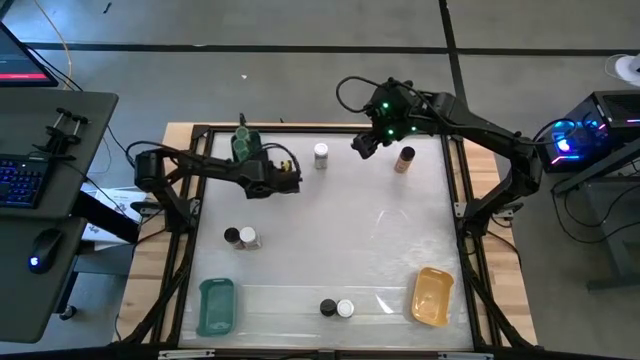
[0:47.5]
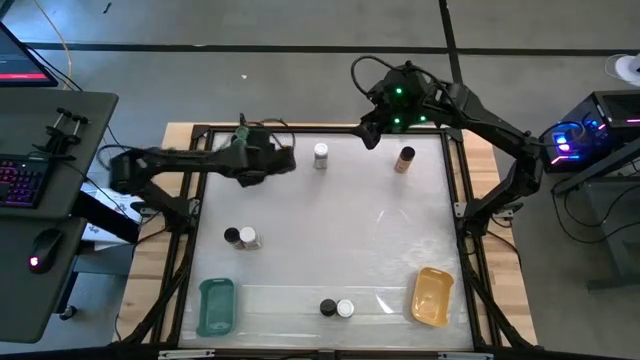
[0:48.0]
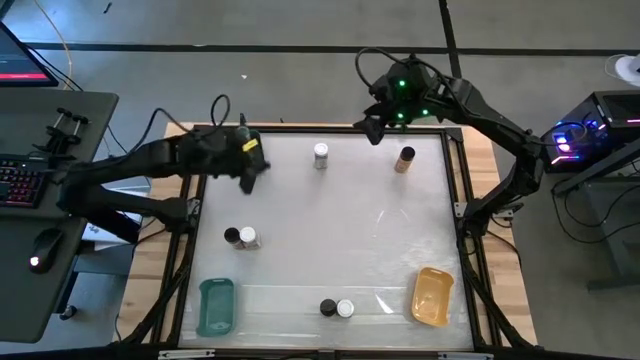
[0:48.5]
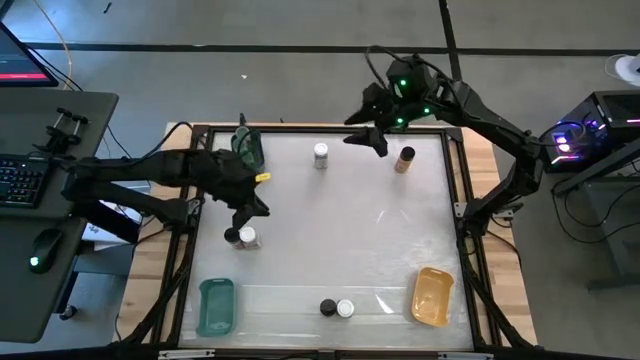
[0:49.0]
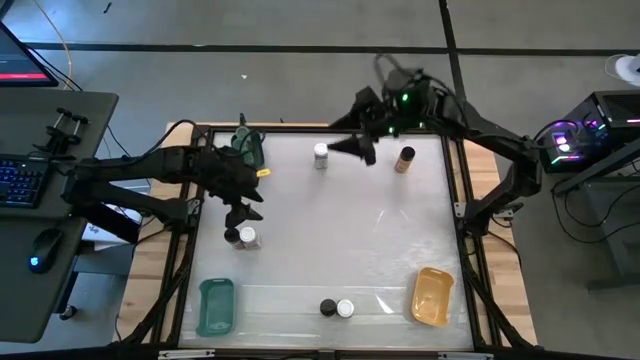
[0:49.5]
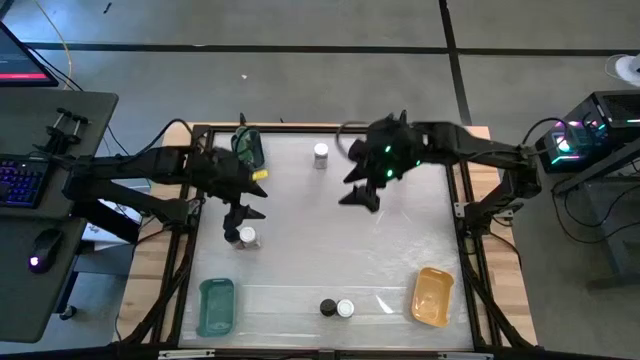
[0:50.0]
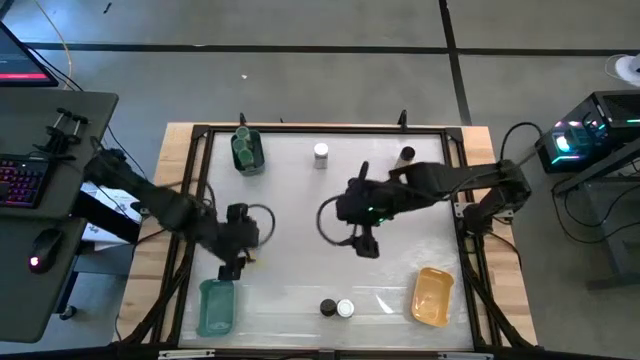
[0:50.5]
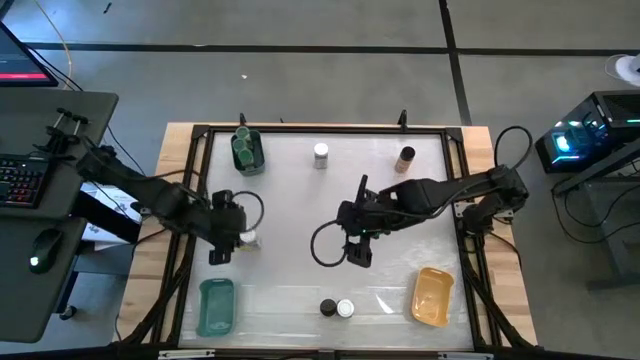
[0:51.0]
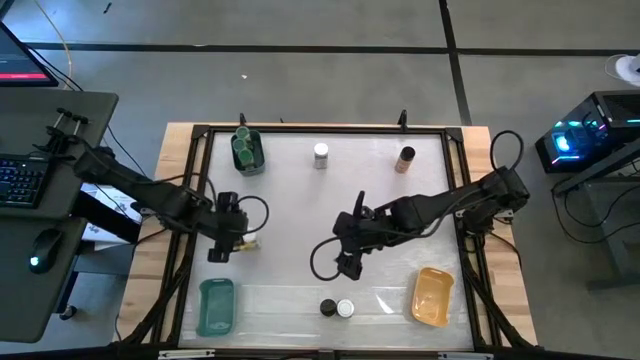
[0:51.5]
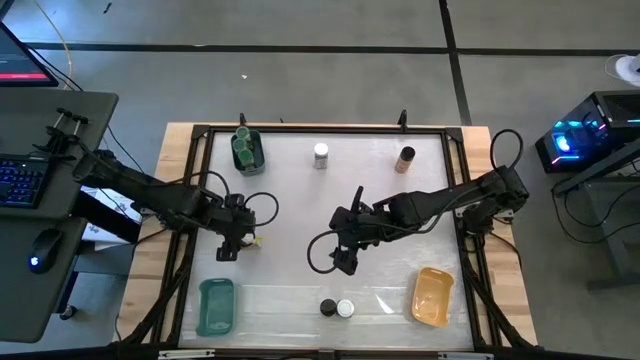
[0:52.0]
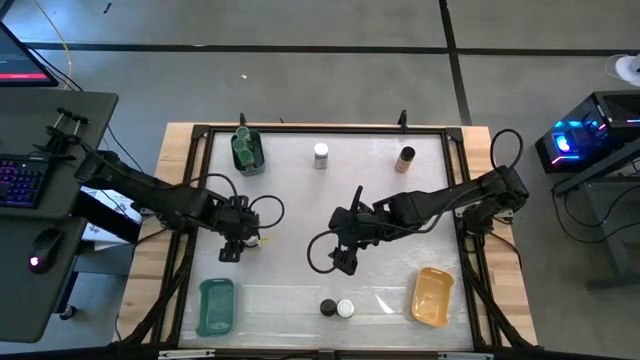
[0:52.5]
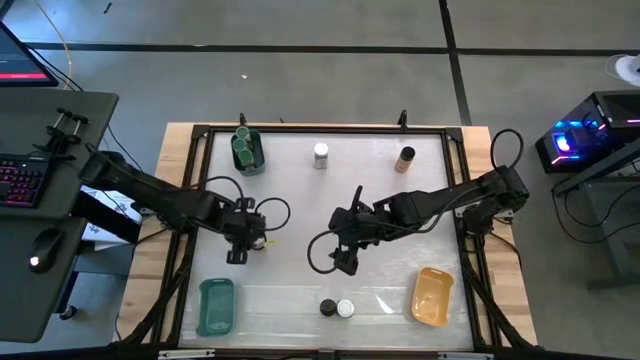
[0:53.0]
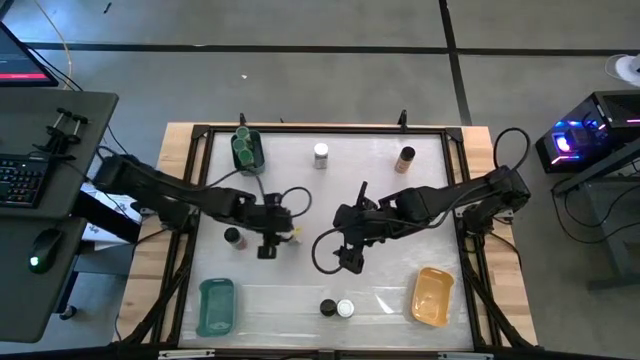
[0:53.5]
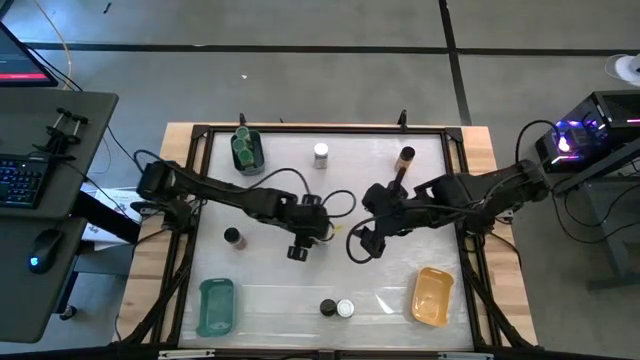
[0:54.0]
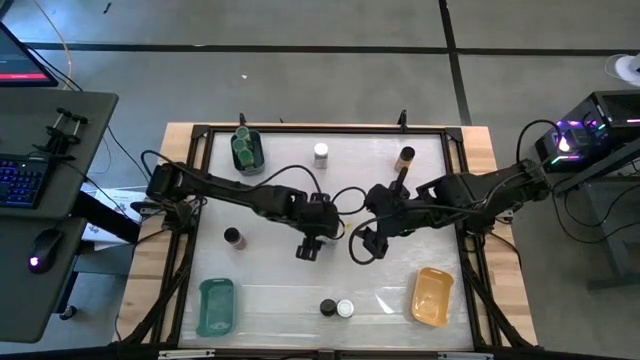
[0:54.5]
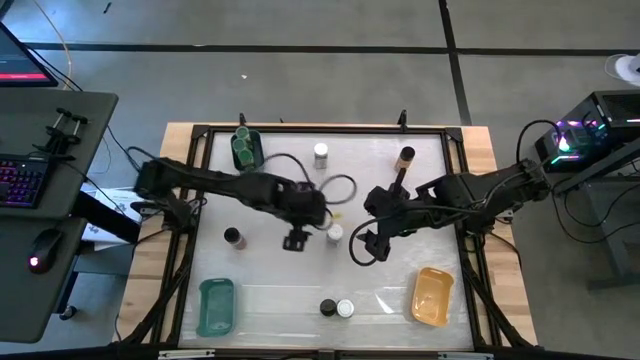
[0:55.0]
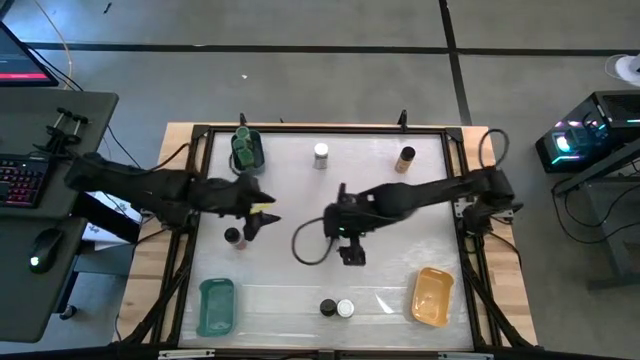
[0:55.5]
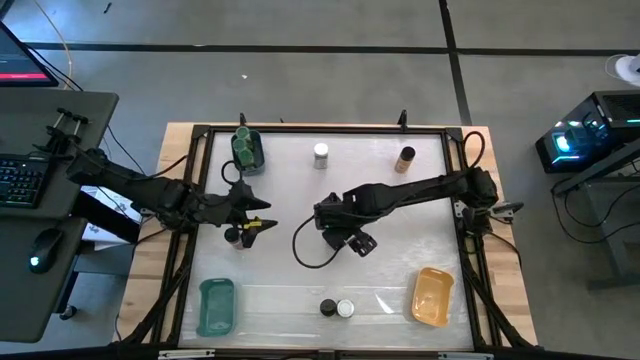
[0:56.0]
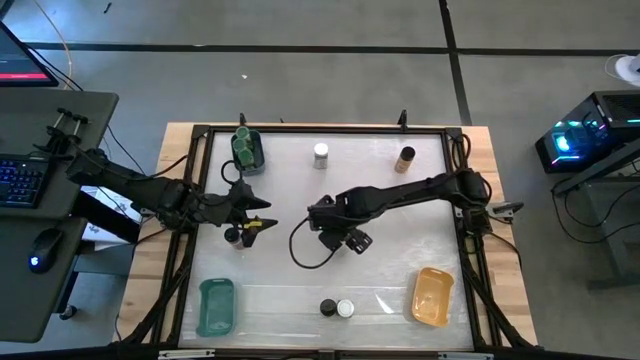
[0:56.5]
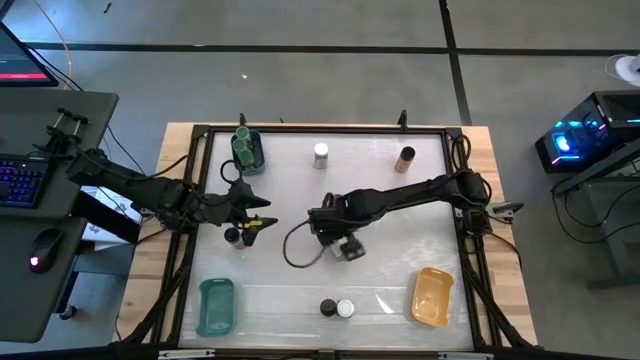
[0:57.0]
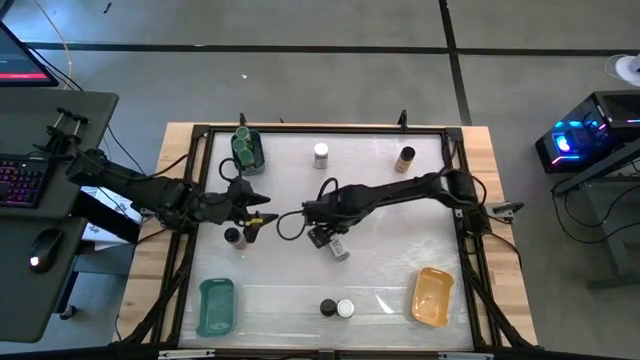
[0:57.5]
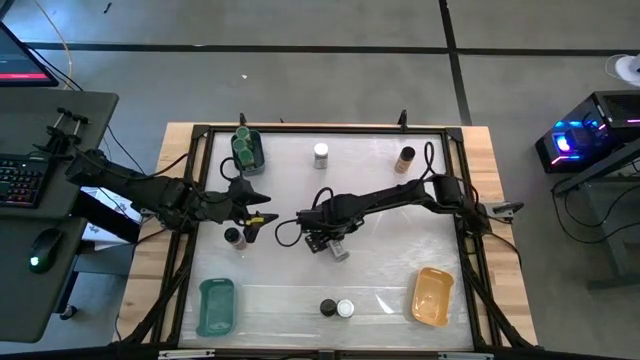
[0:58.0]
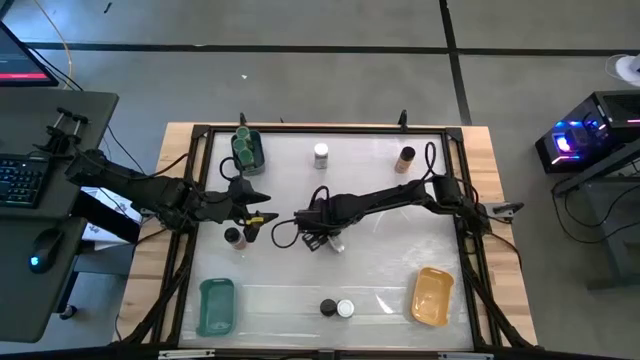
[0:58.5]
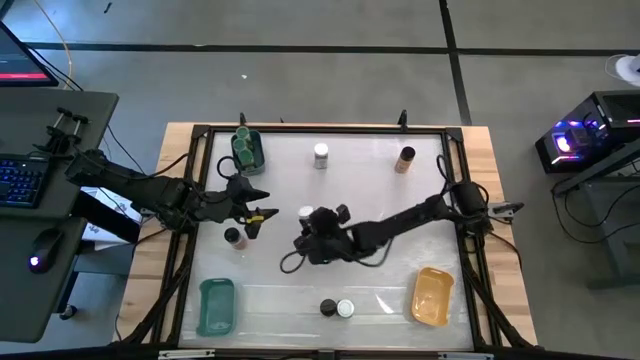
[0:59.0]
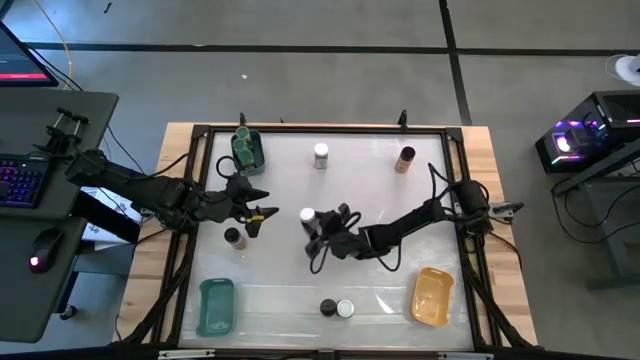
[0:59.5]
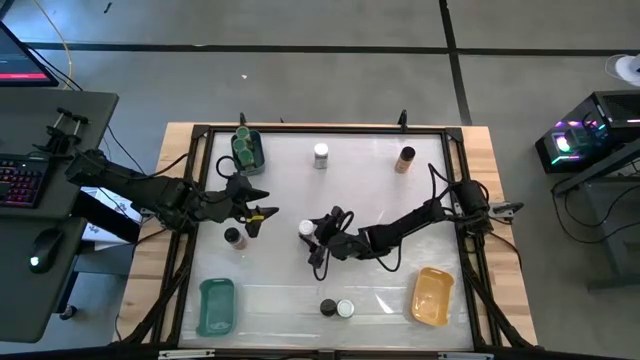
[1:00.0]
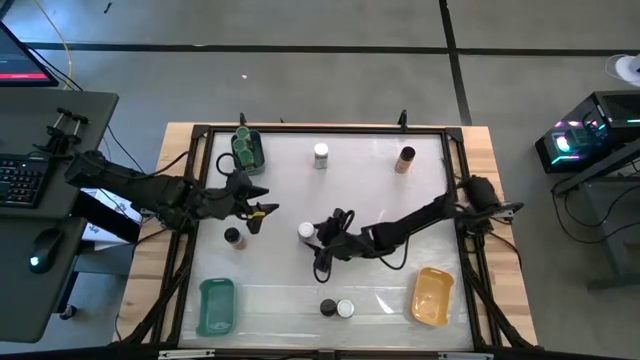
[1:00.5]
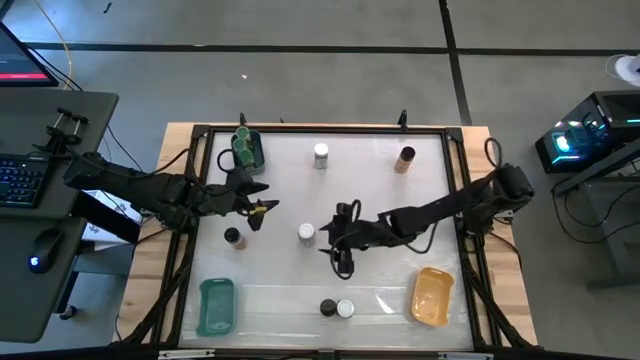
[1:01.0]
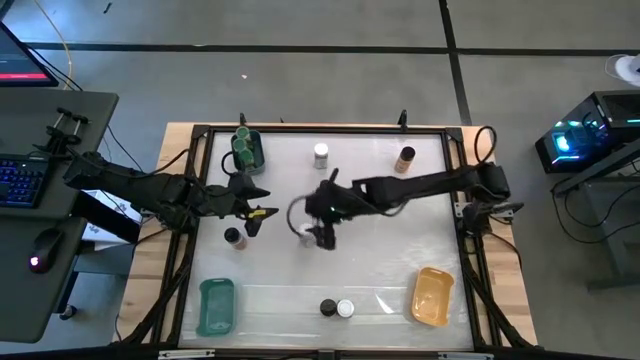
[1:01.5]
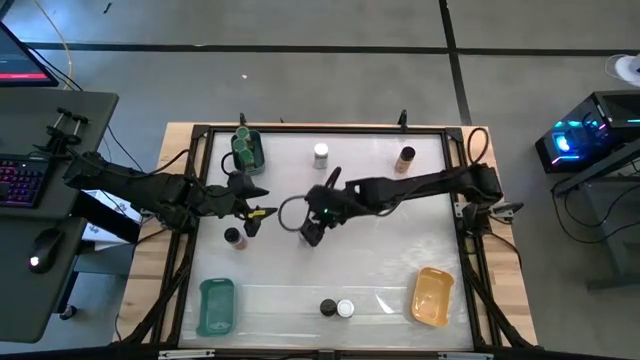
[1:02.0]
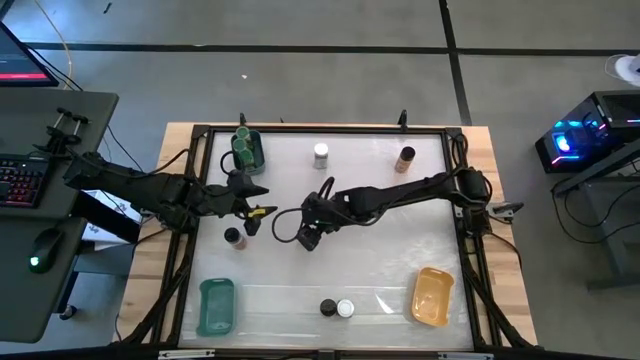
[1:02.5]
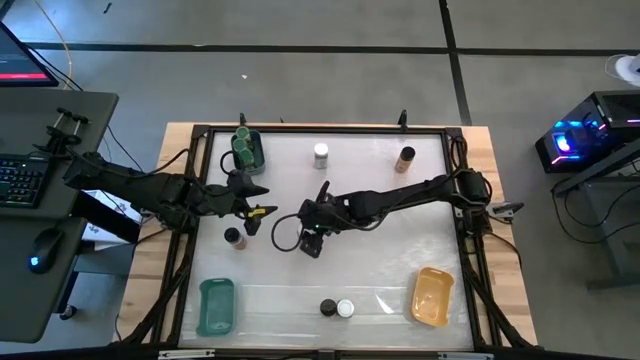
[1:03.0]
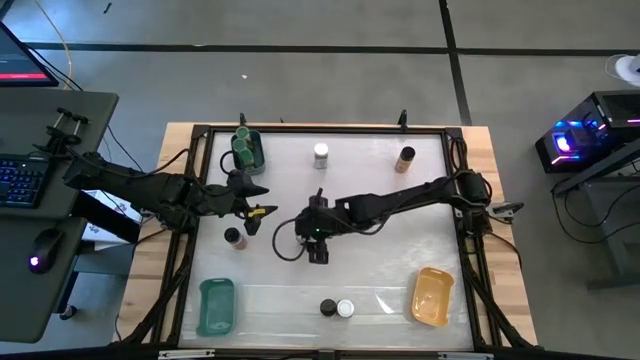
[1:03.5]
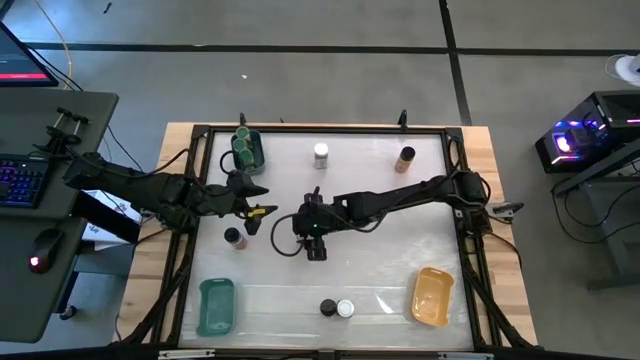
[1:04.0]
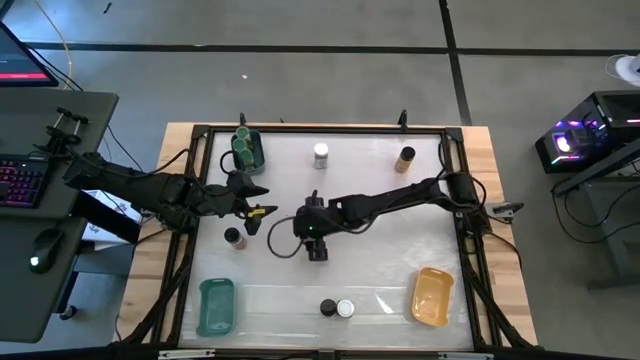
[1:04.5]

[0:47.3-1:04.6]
Task: Sort spices by type
Put the middle left white seasoning bottle into the yellow bin

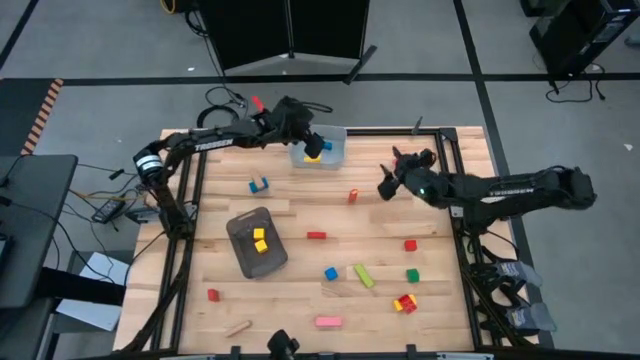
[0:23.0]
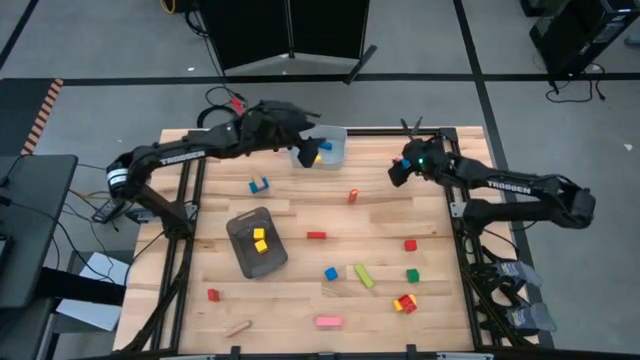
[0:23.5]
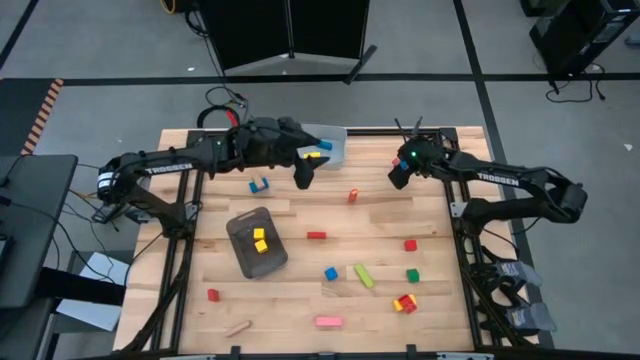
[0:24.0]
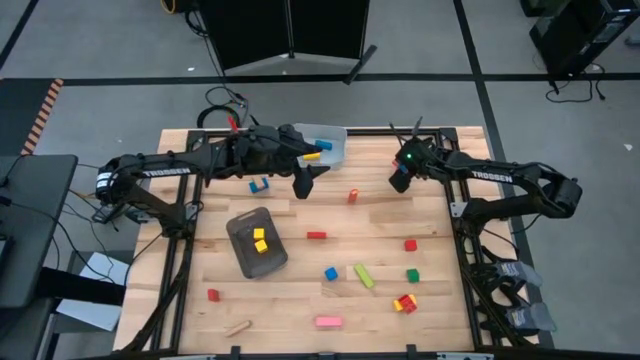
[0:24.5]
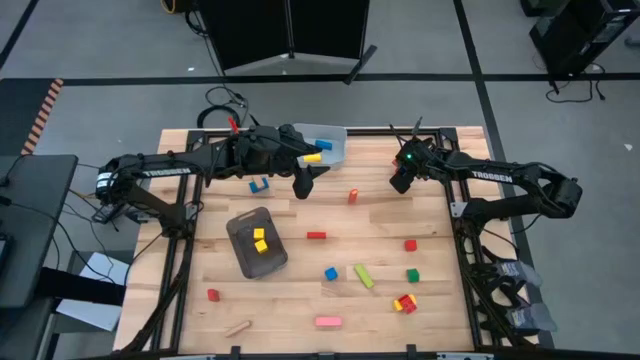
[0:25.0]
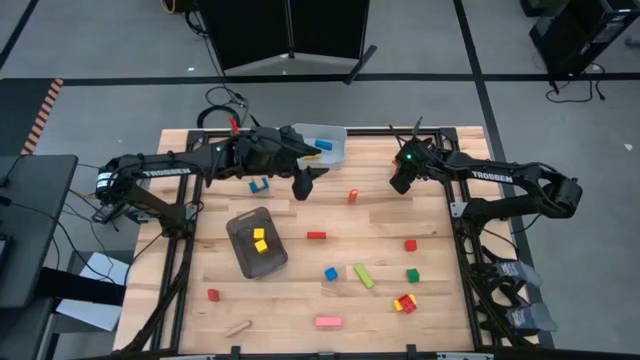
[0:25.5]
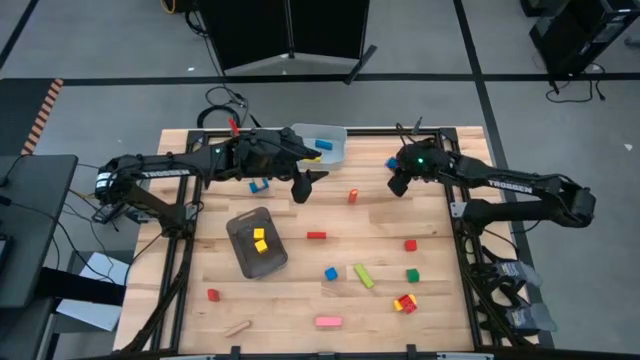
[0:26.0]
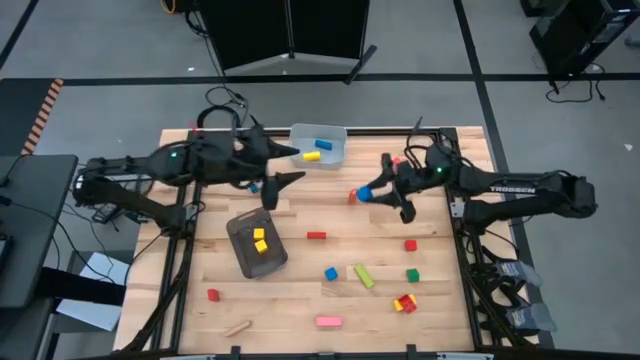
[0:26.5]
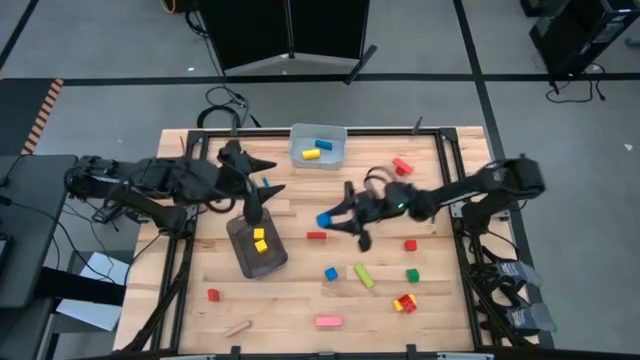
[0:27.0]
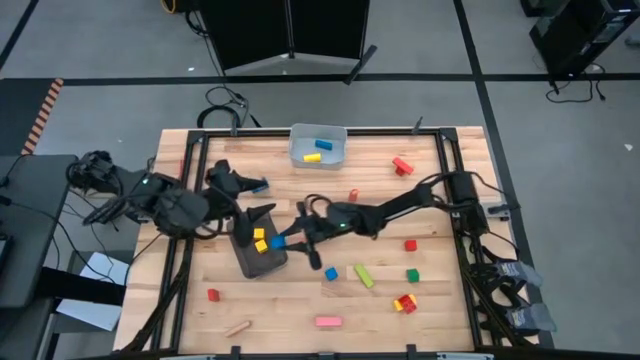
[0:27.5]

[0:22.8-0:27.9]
Task: Sort blocks by size
Put the blue square block into the black bin
